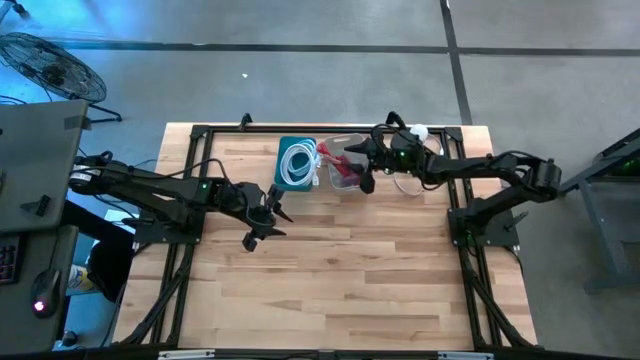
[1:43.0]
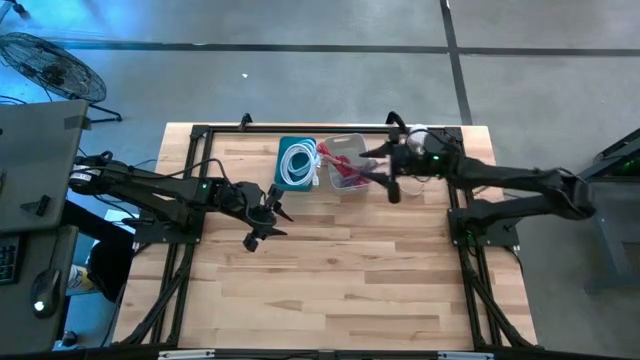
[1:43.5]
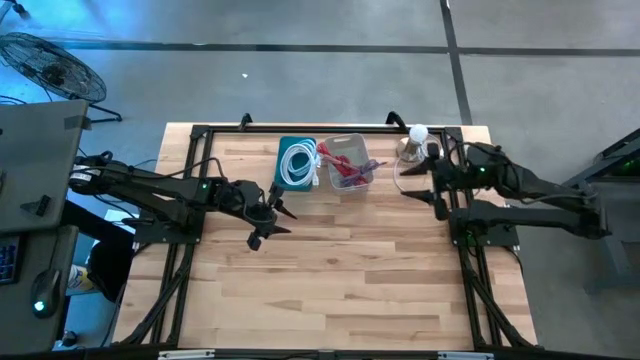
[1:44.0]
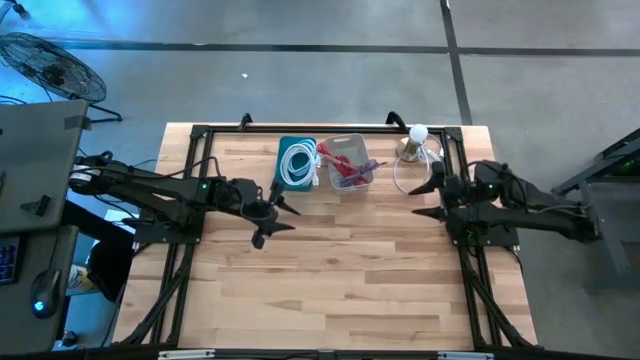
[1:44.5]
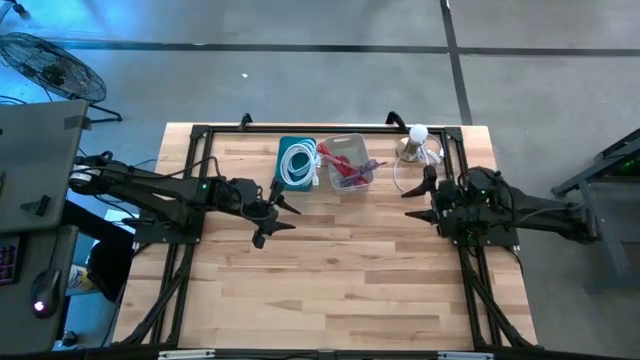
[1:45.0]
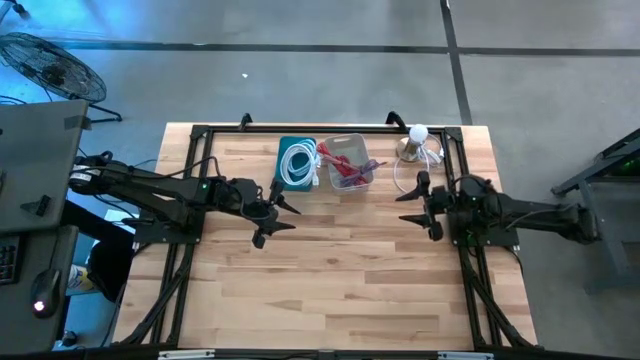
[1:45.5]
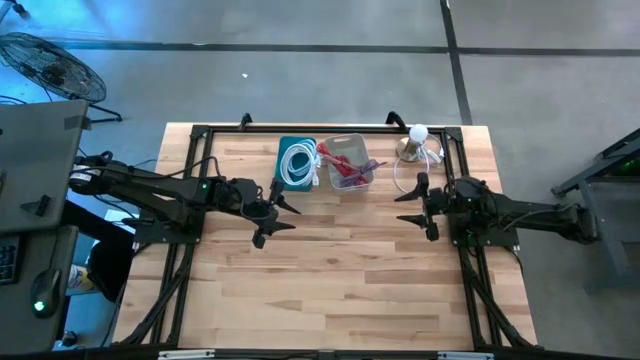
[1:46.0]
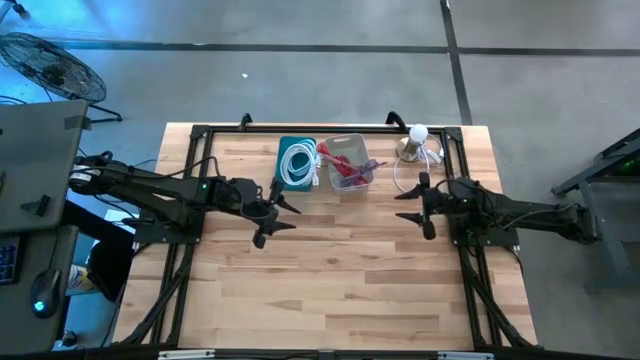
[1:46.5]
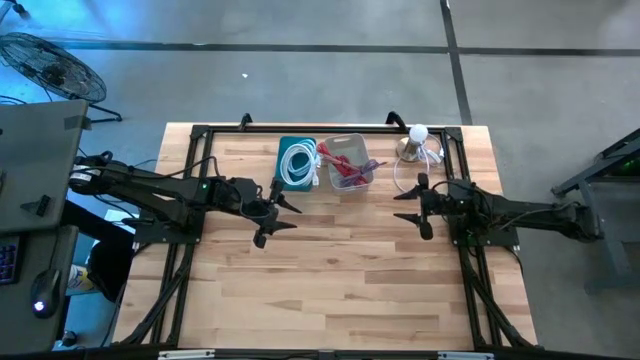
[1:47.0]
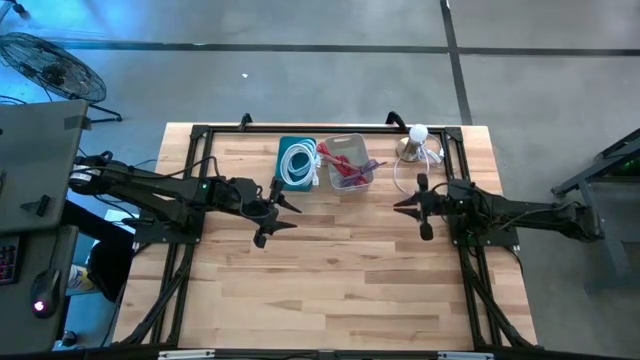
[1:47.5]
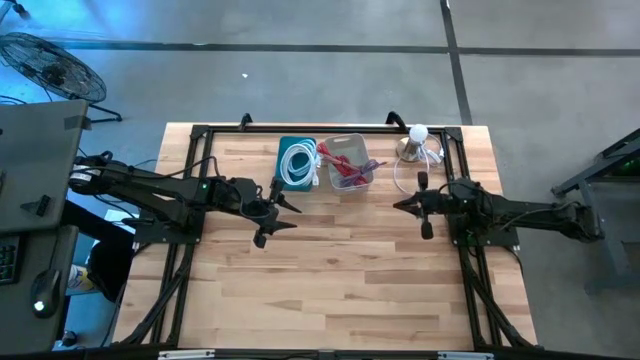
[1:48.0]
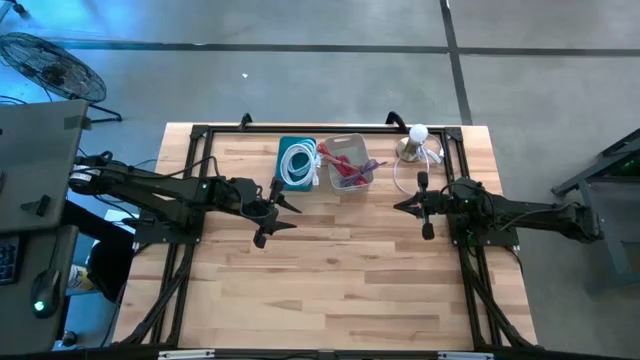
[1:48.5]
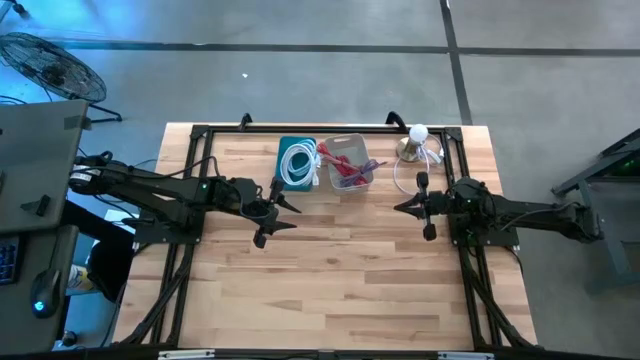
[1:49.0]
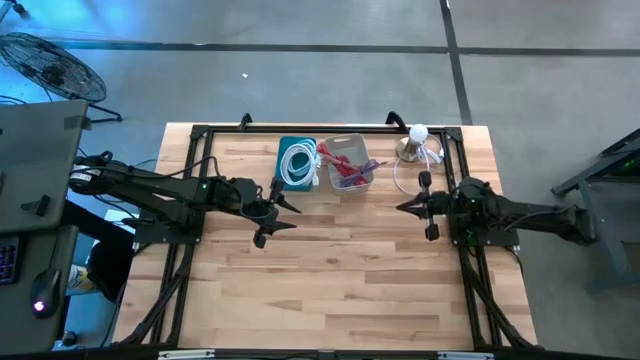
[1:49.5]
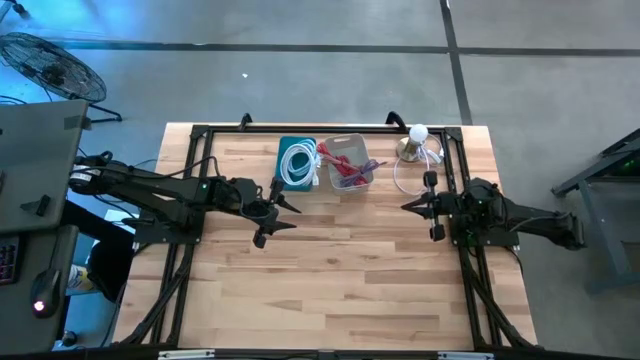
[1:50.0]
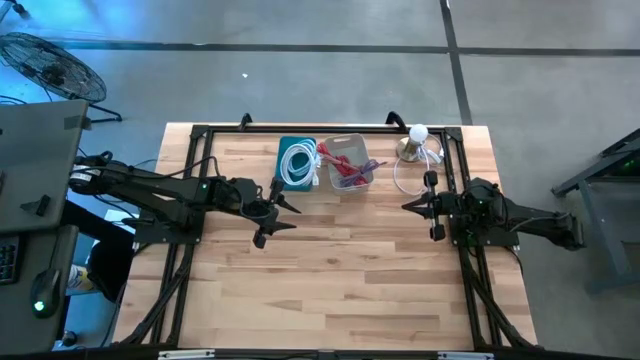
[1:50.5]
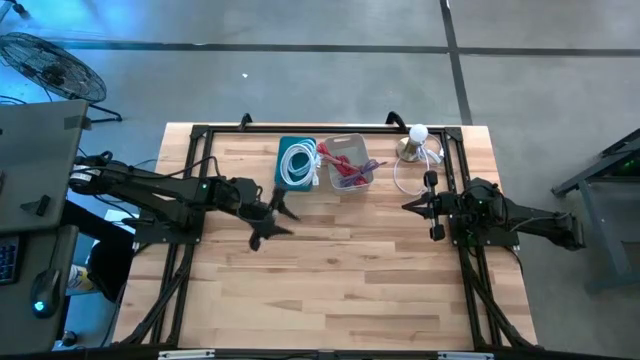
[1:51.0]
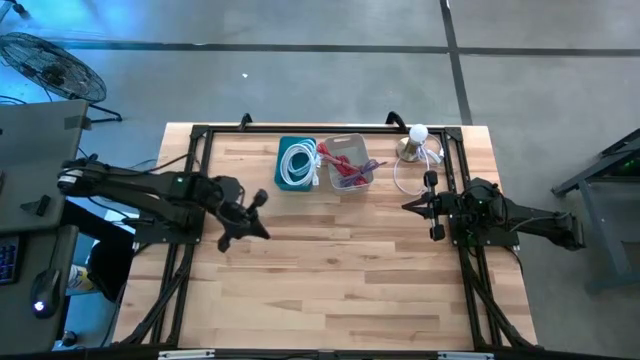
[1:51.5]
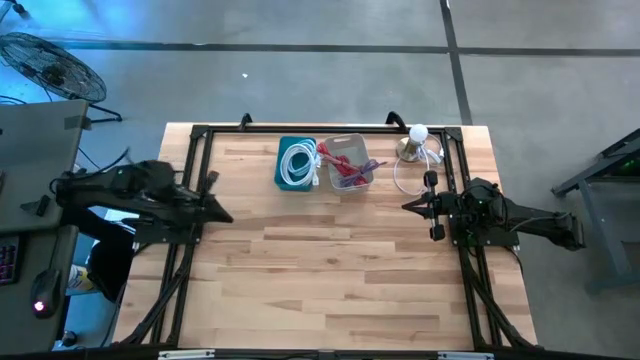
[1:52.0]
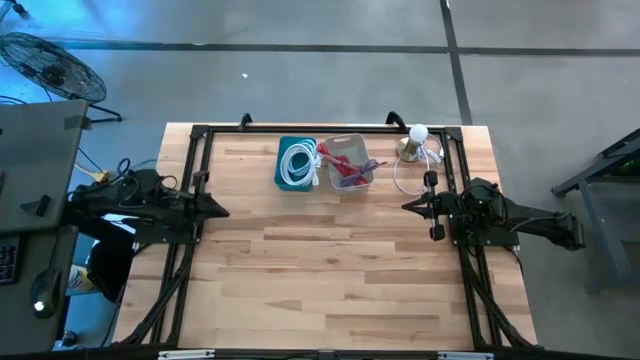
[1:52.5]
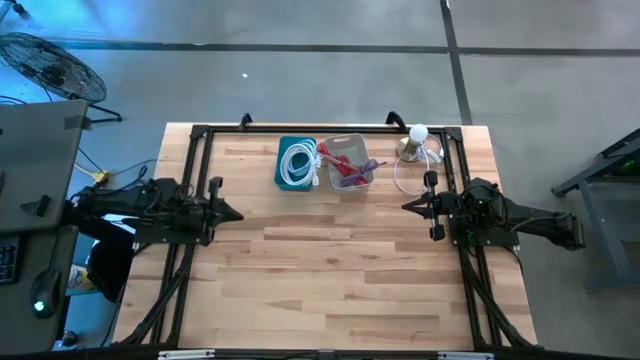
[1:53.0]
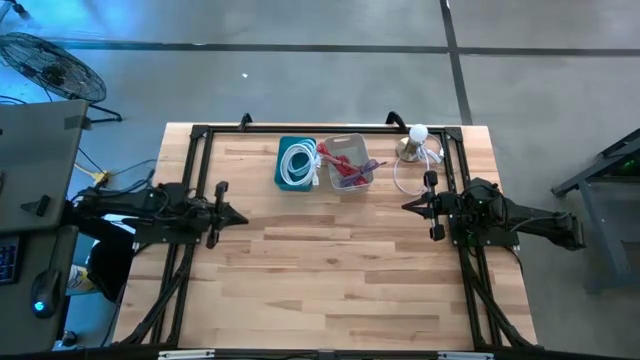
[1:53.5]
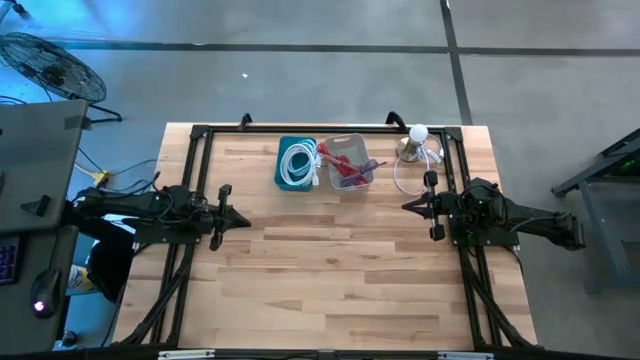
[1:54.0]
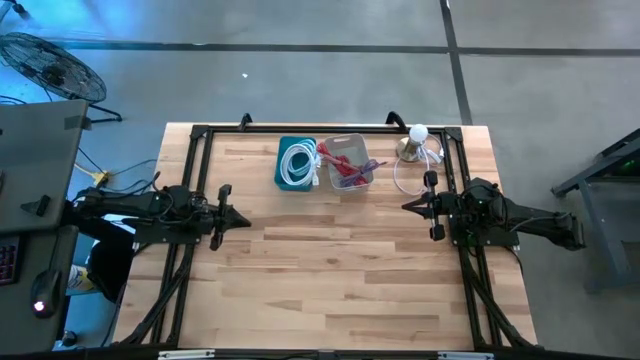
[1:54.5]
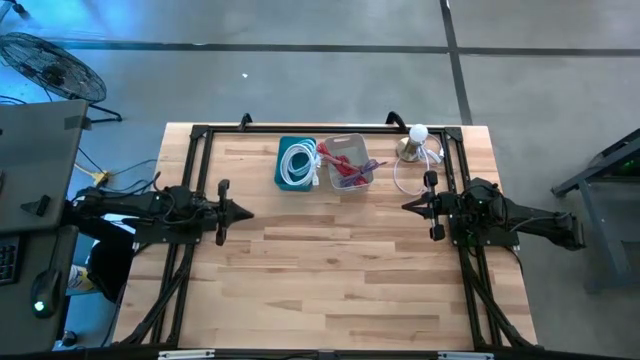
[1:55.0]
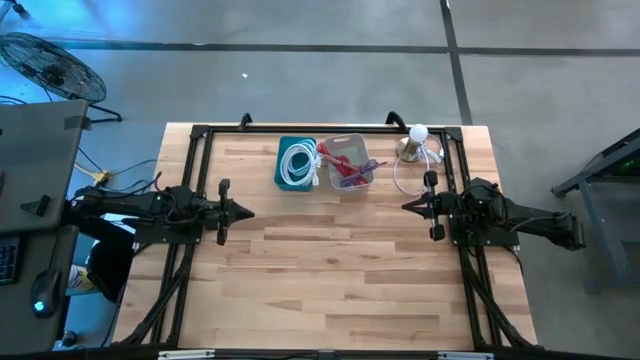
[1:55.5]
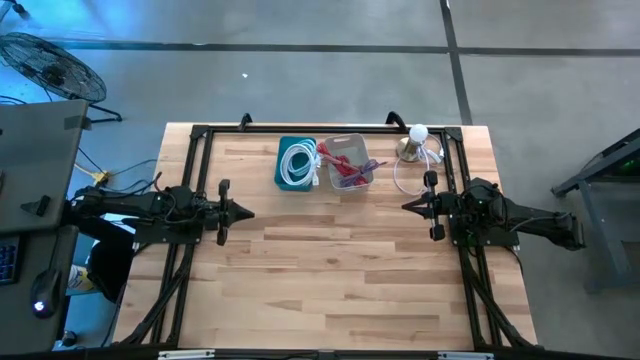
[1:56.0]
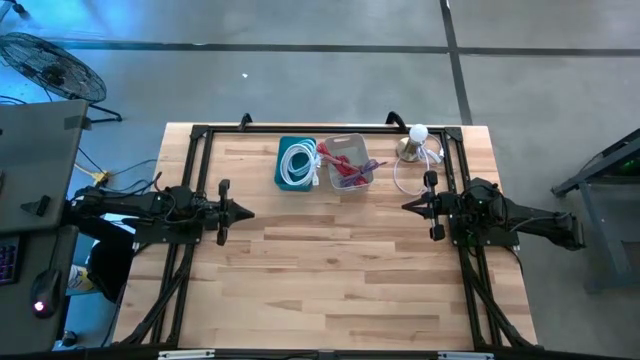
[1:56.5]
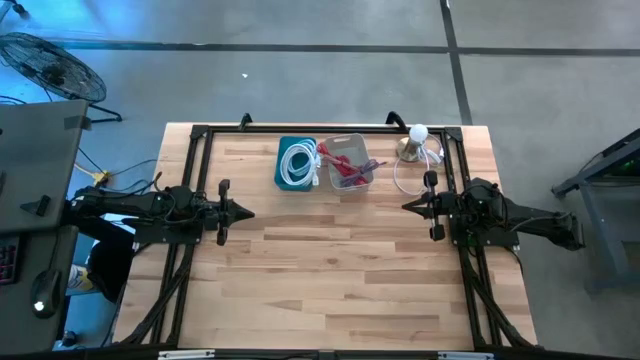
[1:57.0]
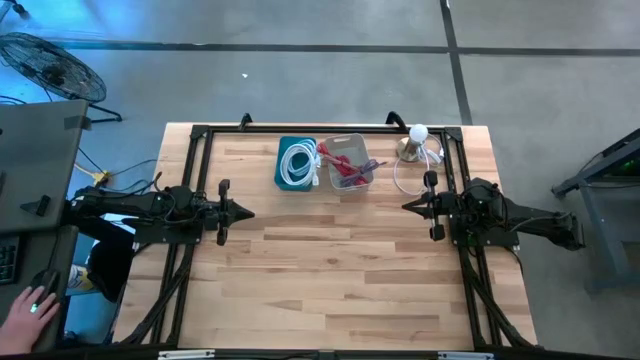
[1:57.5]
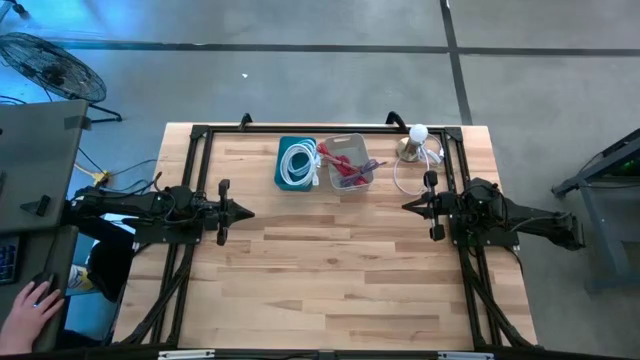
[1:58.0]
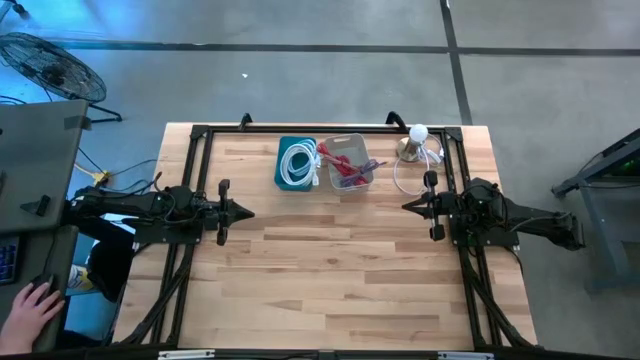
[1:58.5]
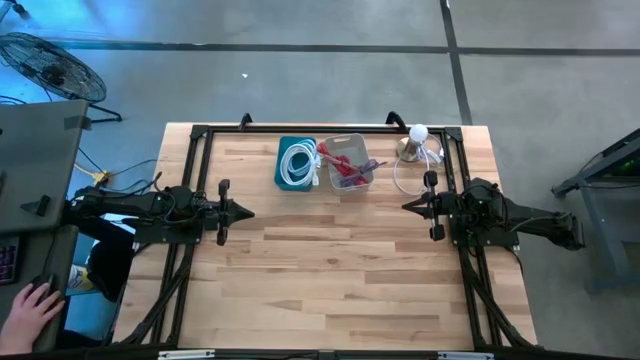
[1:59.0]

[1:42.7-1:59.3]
Task: Pick & Place USB Port
Return to Home Position

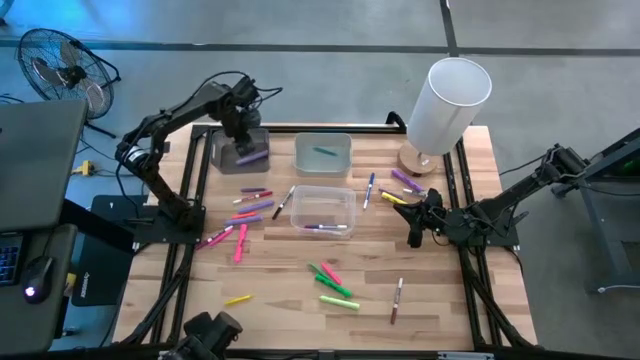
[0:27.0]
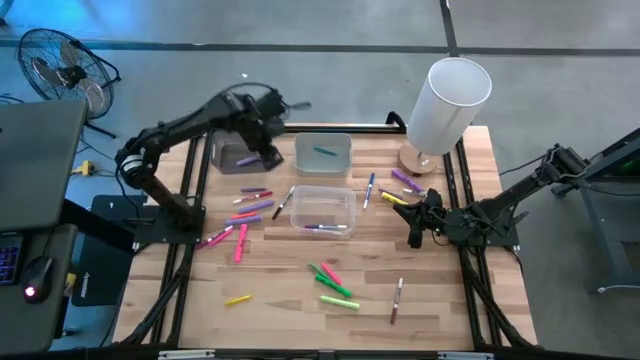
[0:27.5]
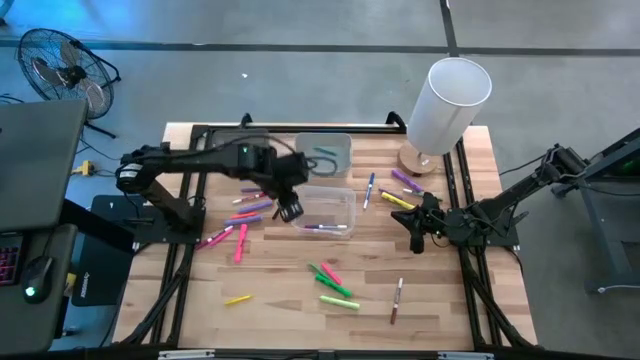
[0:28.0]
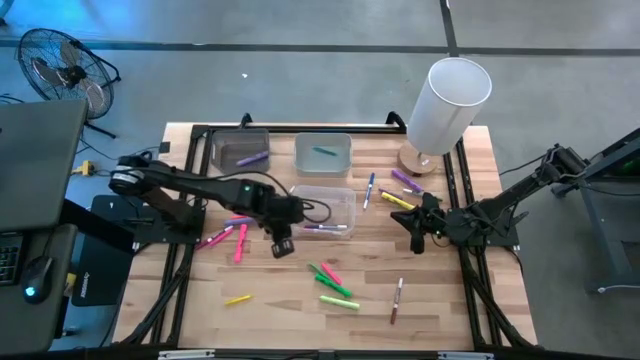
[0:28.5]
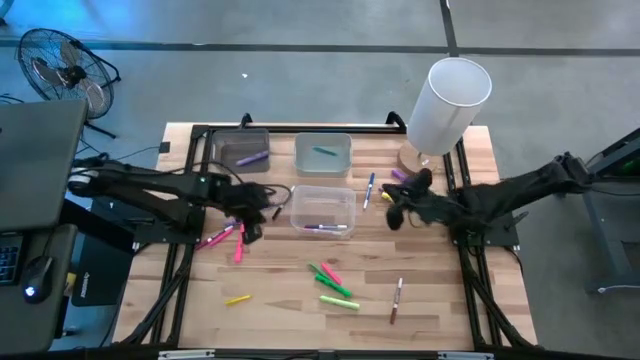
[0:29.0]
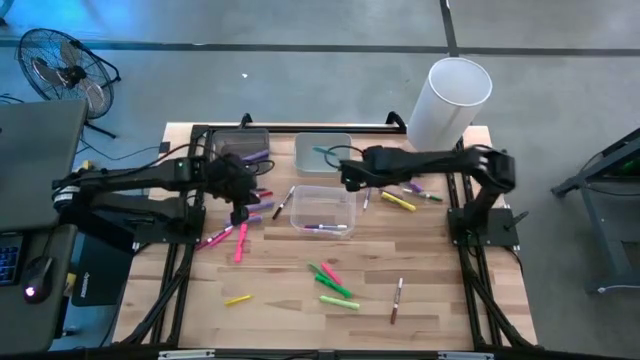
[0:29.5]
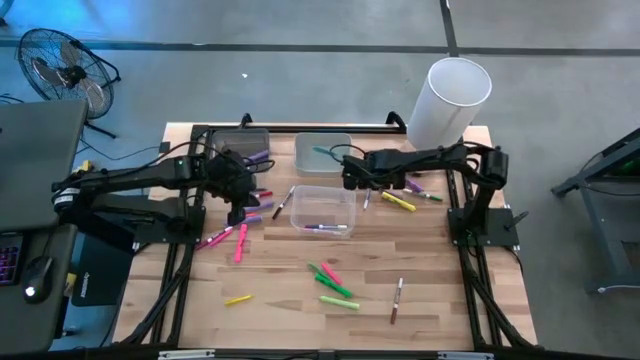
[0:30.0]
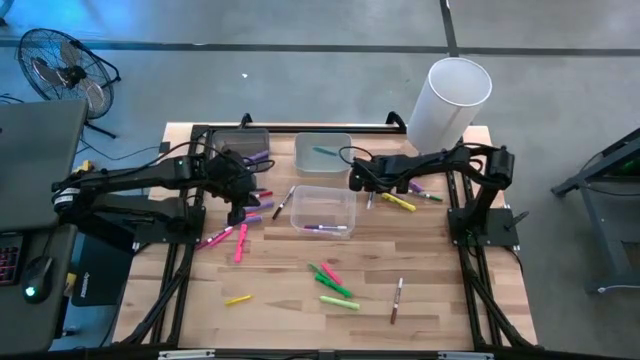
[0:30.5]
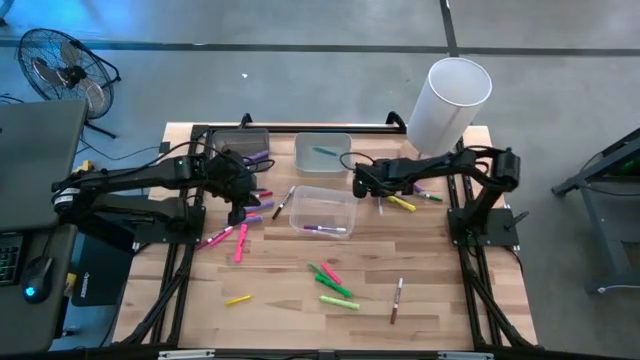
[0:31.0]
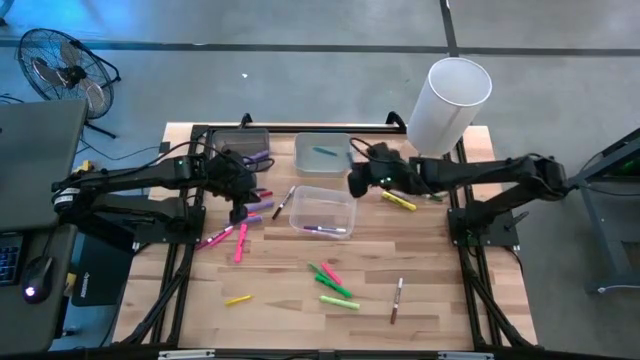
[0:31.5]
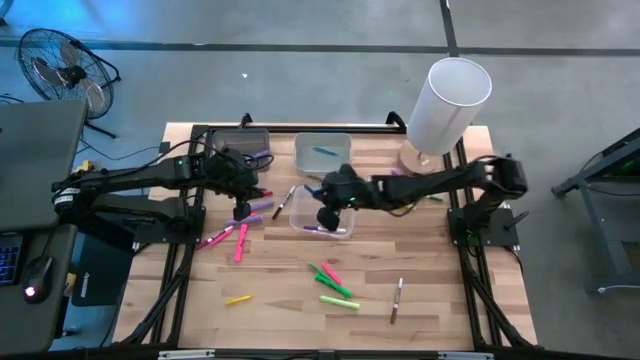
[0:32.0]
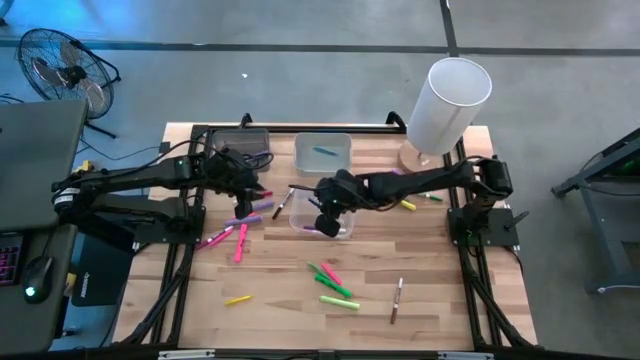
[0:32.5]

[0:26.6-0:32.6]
Task: Pick & Place Markers
Put the blue marker into the white bin
